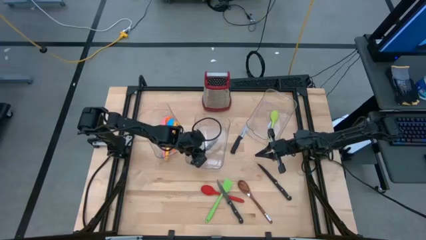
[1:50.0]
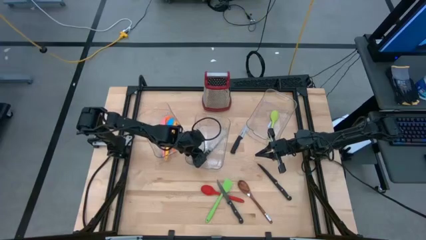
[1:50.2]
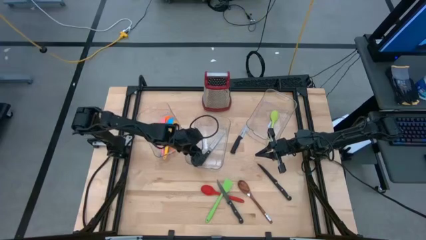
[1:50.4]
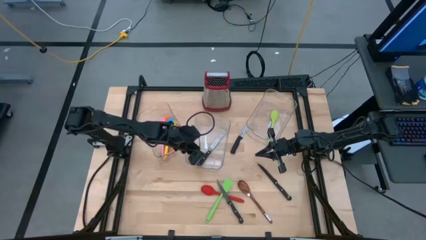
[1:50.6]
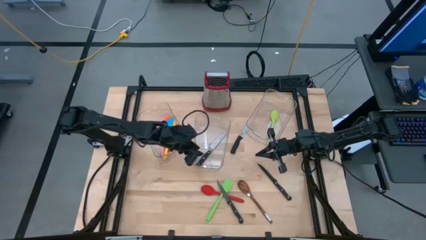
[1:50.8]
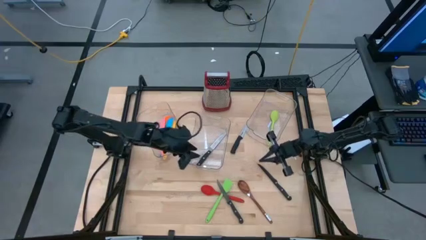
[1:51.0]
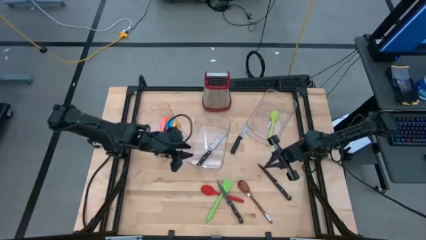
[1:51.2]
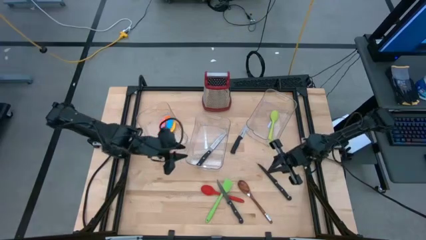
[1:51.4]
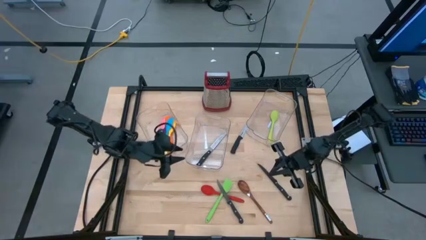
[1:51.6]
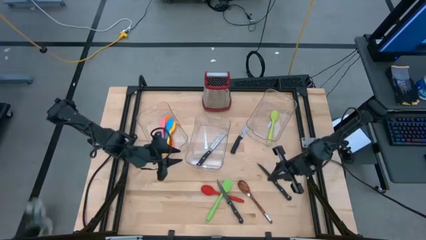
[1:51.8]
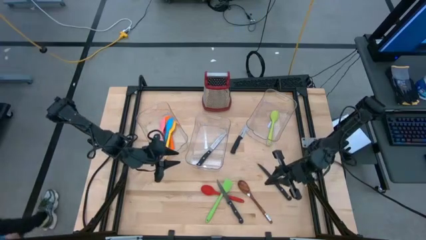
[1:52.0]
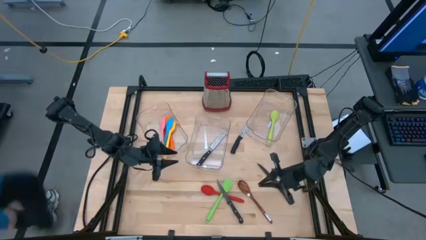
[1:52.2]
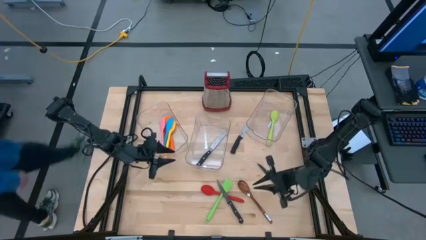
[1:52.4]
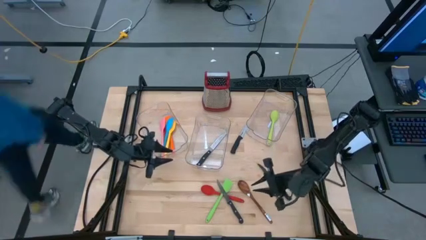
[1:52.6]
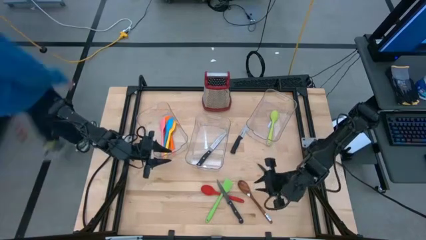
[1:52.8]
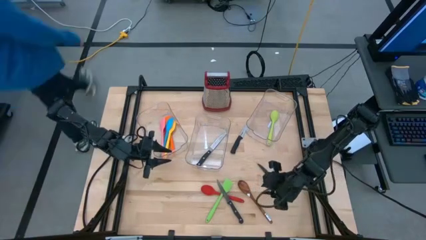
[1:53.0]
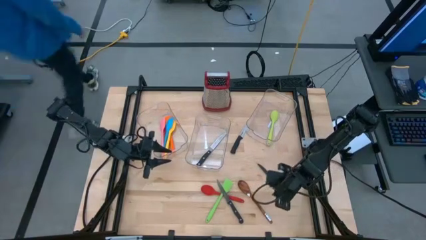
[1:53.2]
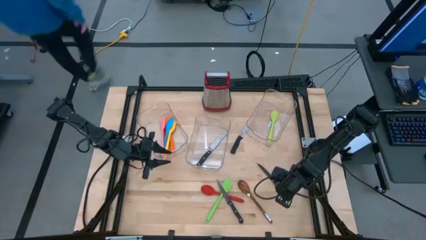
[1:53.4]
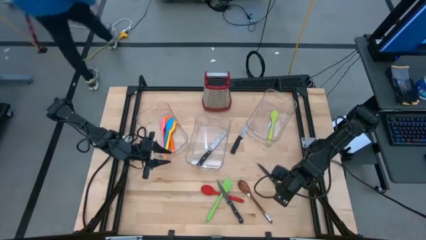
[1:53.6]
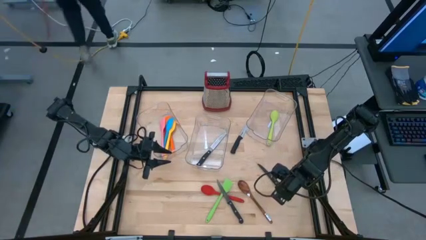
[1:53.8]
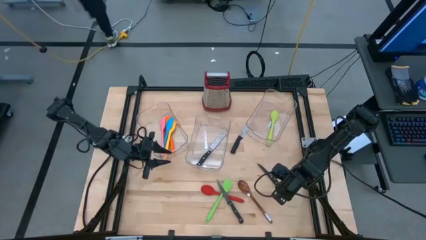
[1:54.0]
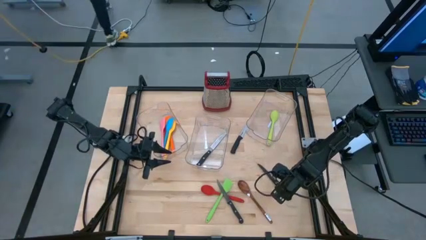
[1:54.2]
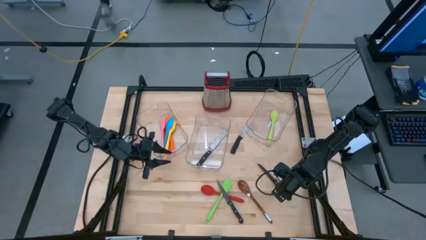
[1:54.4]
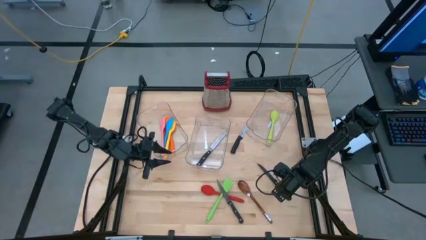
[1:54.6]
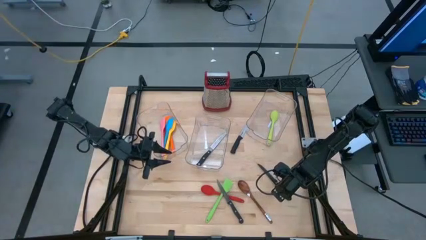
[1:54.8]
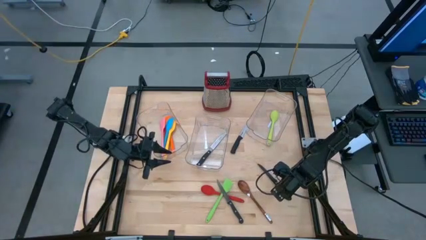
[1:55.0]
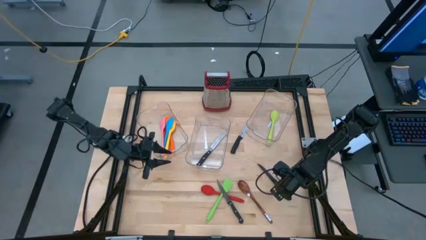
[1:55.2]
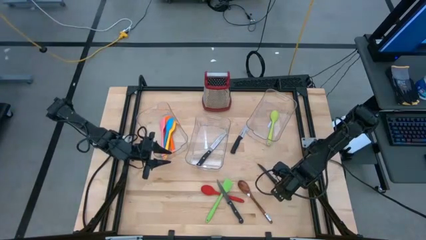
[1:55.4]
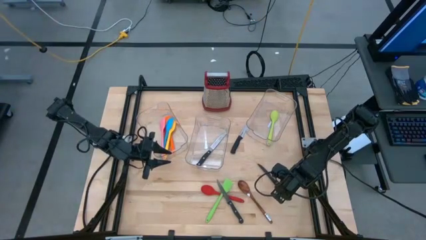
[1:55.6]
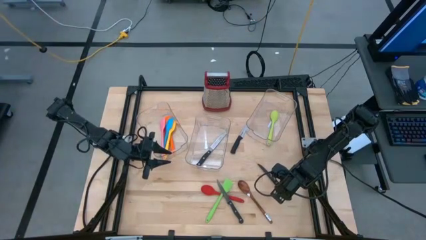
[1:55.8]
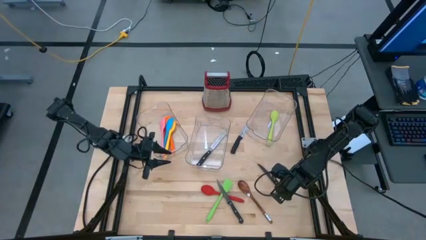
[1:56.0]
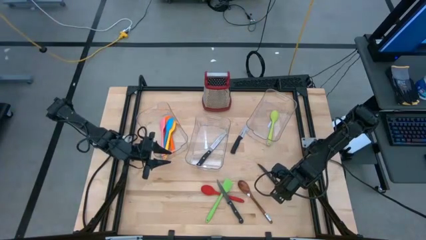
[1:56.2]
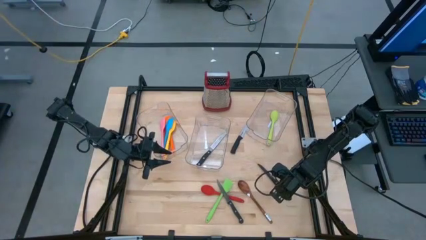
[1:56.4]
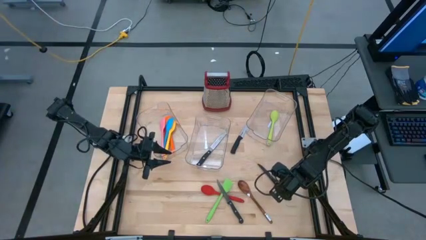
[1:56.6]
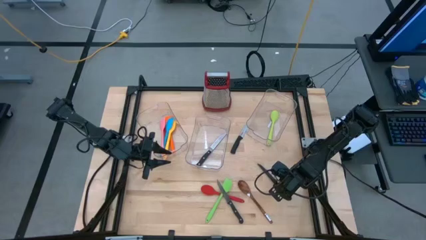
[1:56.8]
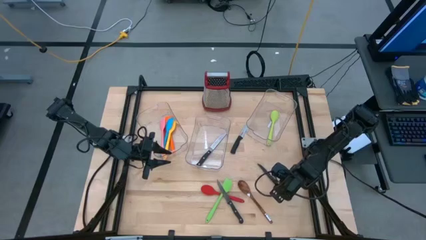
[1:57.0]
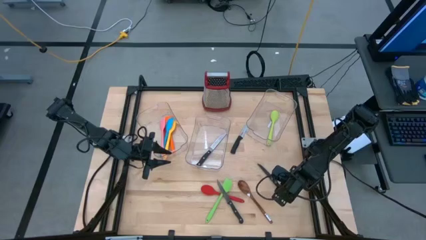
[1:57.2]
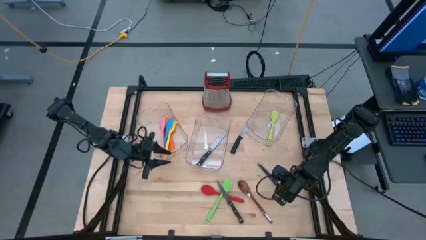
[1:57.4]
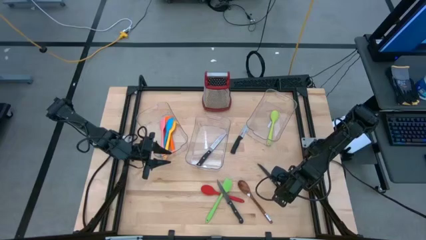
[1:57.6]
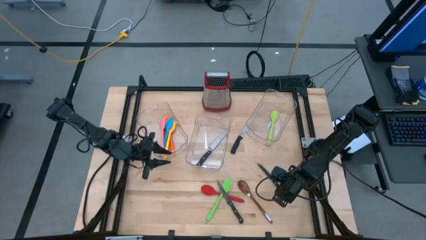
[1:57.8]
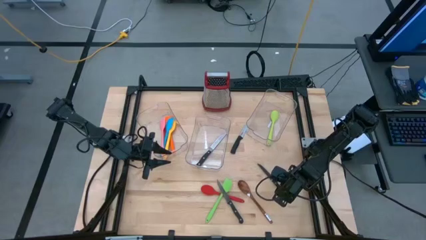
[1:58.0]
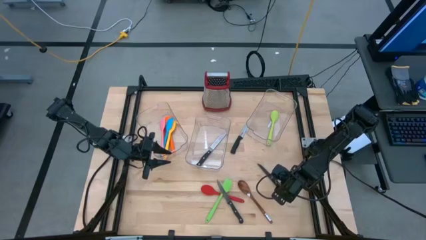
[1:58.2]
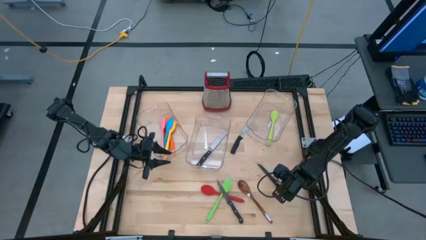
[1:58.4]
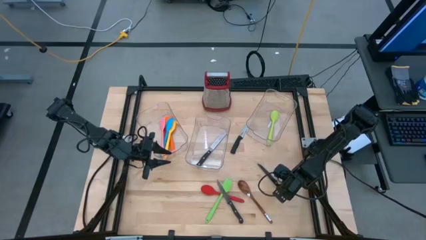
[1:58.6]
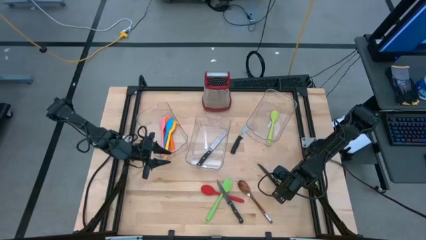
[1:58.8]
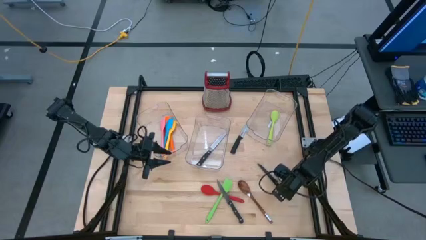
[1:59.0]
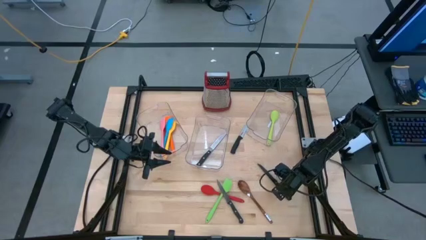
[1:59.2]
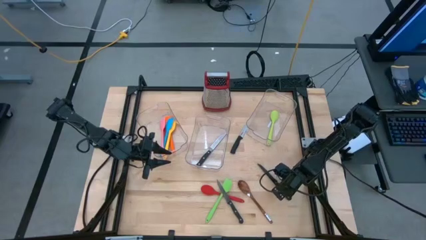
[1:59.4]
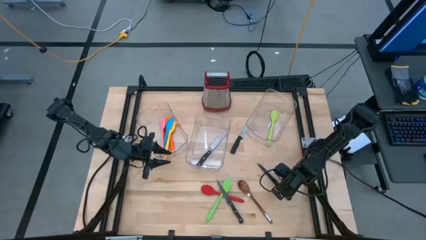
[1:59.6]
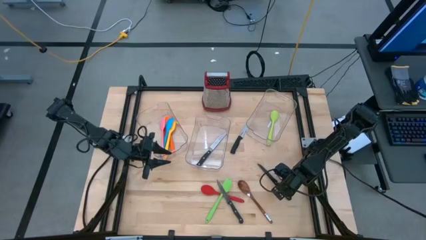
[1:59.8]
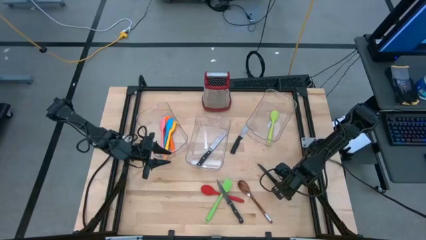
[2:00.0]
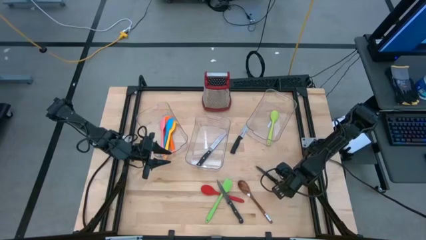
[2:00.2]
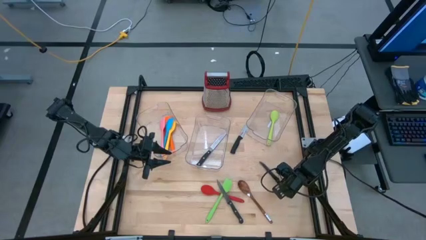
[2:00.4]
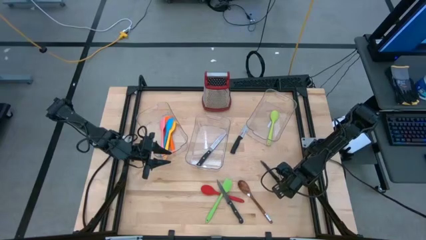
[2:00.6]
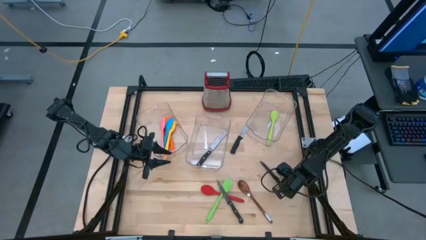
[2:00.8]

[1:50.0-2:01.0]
Task: Pick & Place Kitchen Items
Put the black knife into the middle transparent bin
